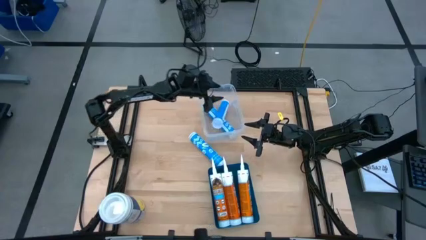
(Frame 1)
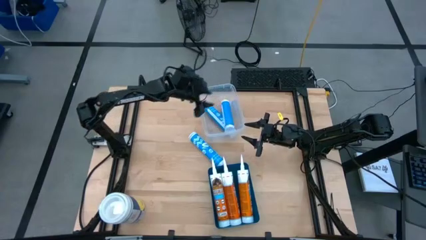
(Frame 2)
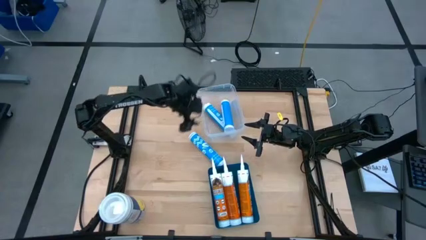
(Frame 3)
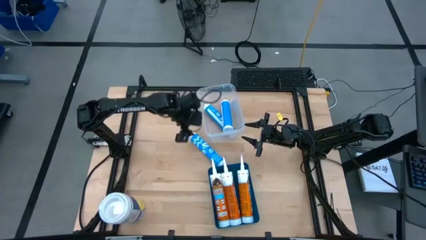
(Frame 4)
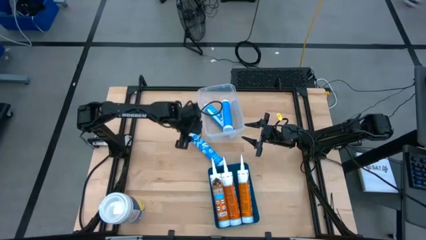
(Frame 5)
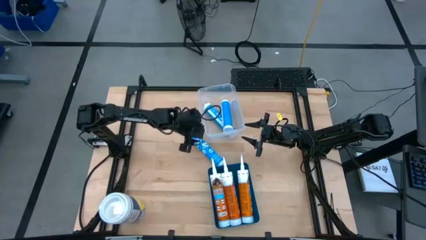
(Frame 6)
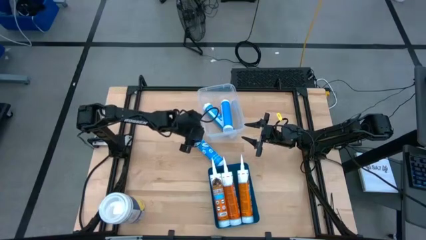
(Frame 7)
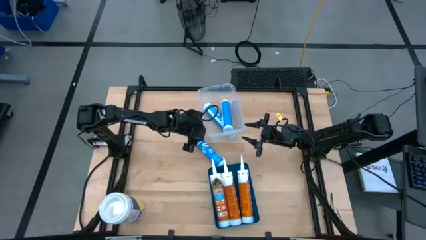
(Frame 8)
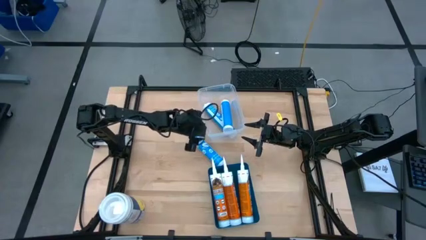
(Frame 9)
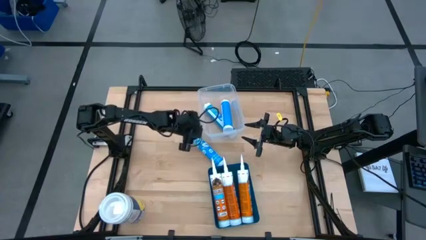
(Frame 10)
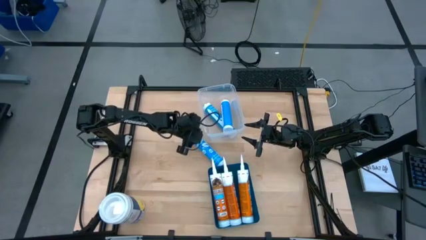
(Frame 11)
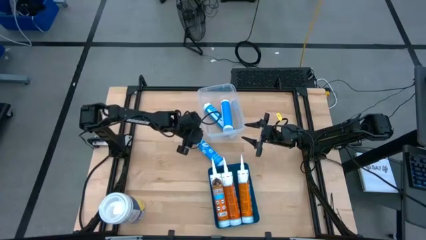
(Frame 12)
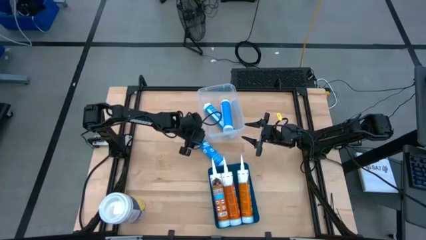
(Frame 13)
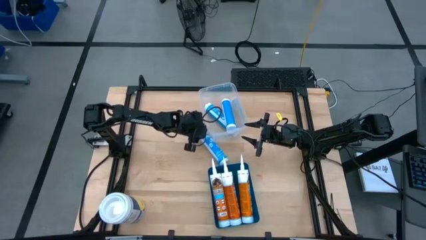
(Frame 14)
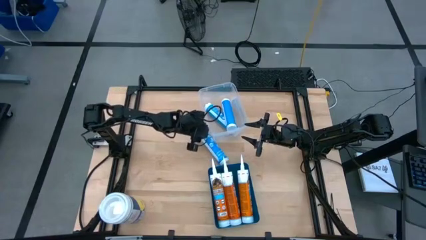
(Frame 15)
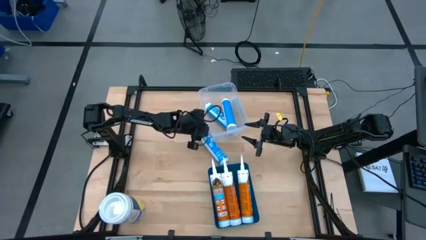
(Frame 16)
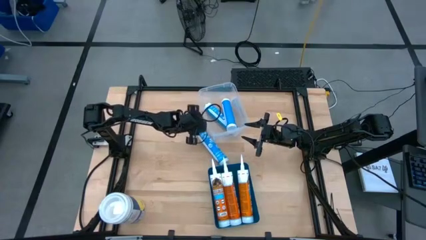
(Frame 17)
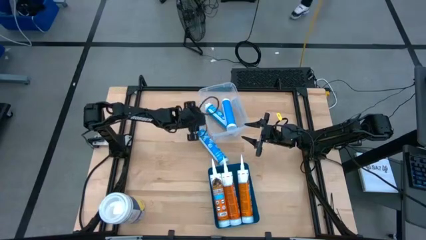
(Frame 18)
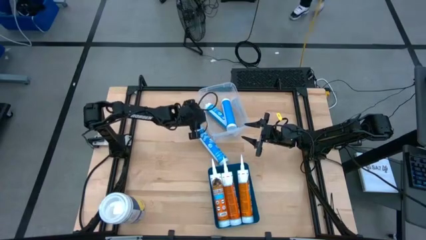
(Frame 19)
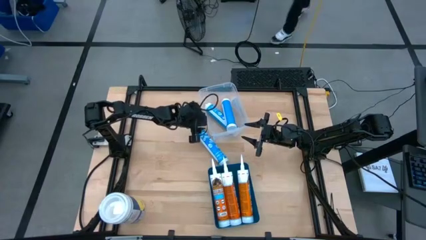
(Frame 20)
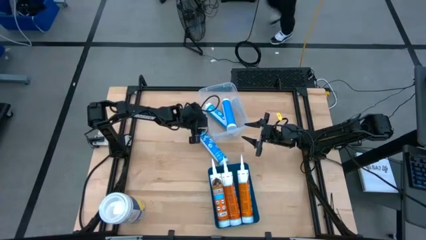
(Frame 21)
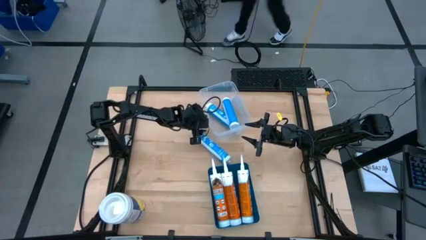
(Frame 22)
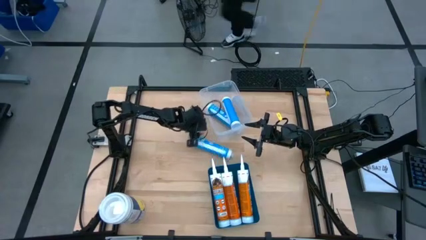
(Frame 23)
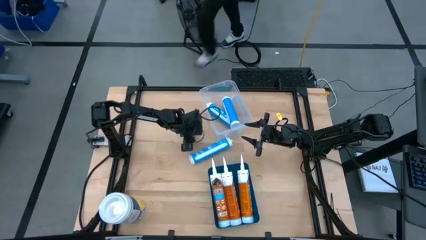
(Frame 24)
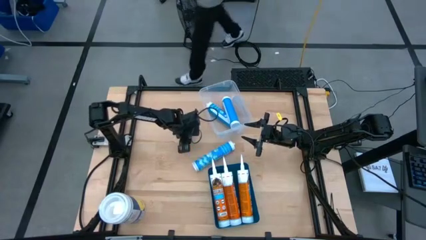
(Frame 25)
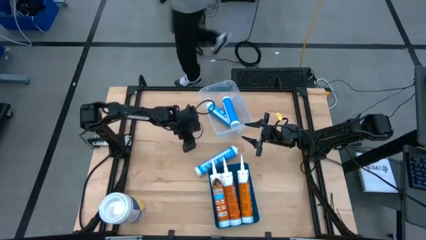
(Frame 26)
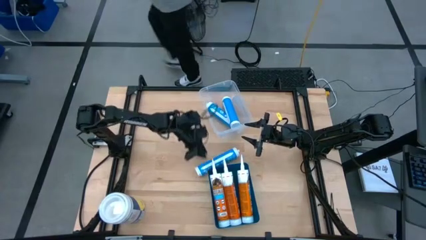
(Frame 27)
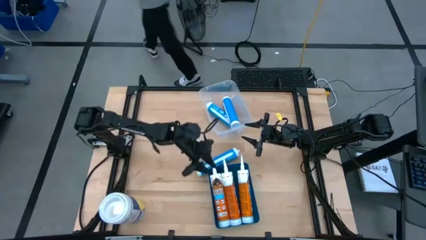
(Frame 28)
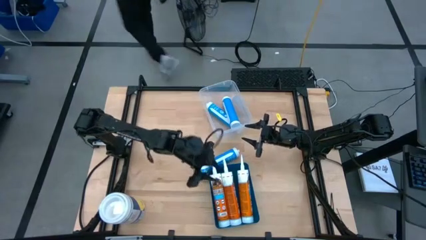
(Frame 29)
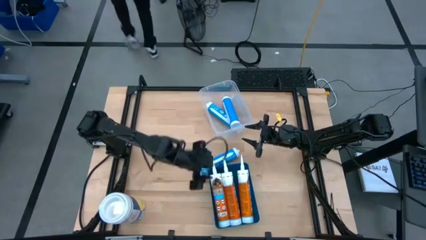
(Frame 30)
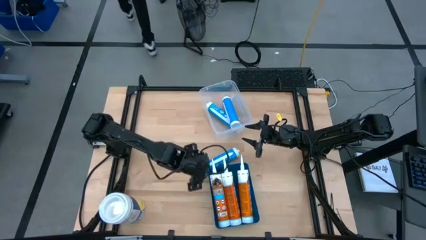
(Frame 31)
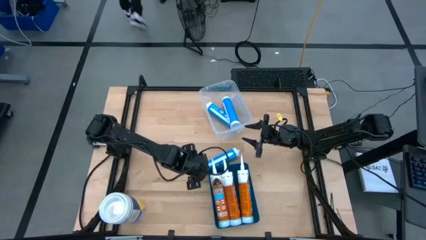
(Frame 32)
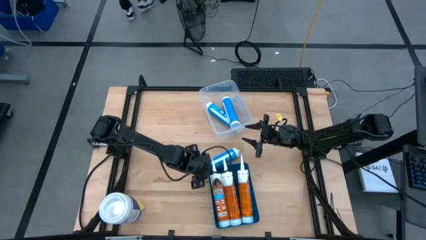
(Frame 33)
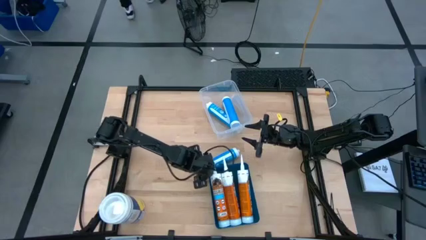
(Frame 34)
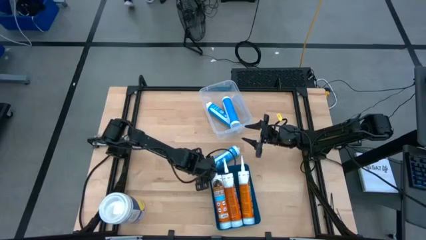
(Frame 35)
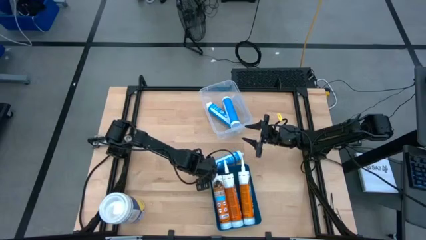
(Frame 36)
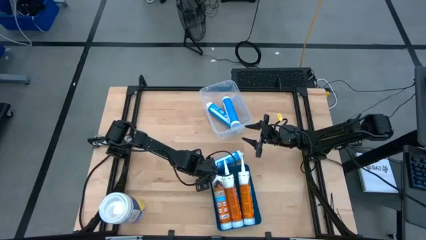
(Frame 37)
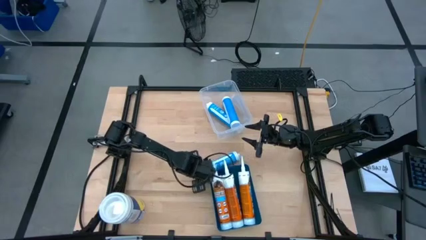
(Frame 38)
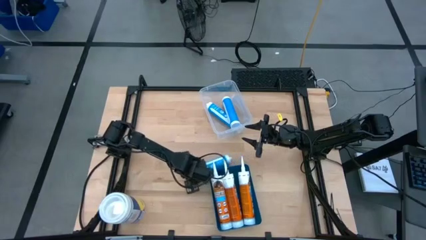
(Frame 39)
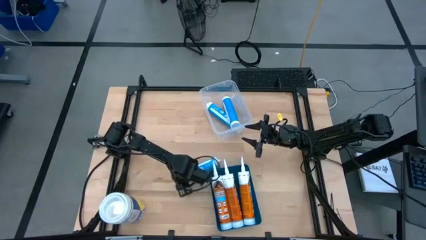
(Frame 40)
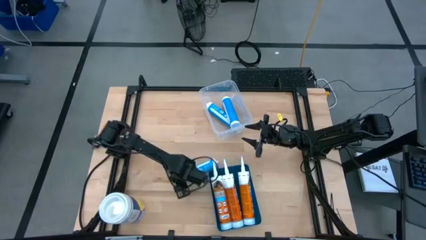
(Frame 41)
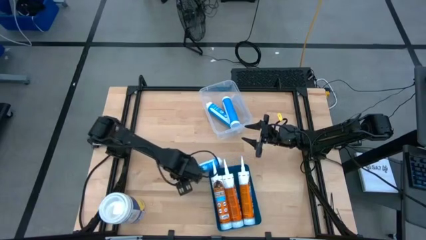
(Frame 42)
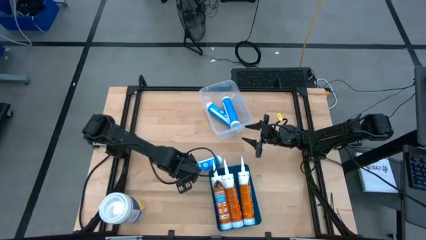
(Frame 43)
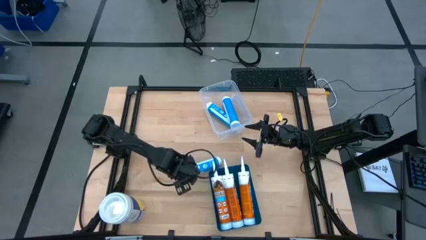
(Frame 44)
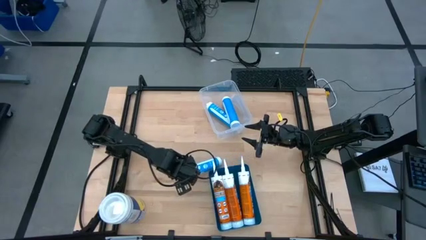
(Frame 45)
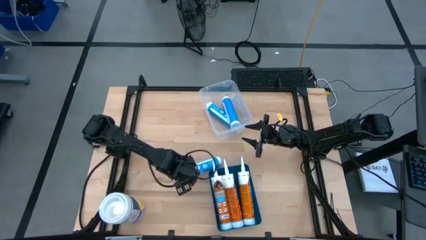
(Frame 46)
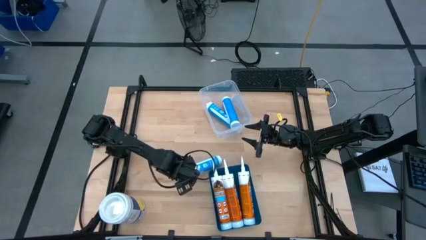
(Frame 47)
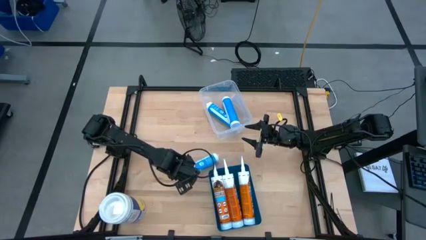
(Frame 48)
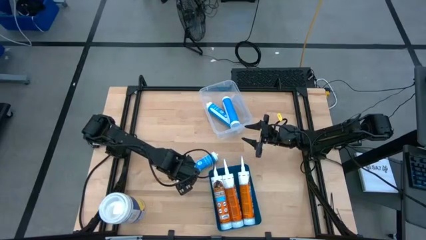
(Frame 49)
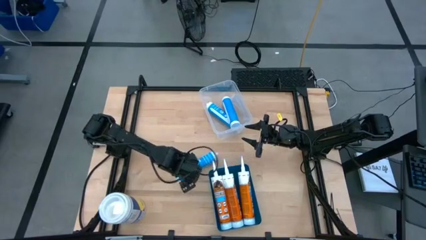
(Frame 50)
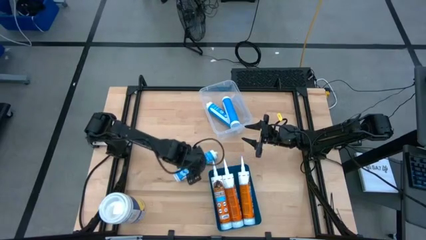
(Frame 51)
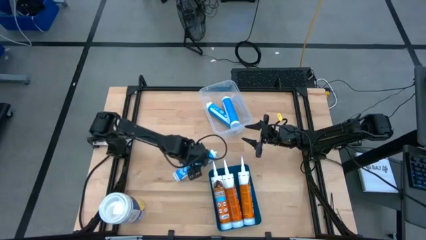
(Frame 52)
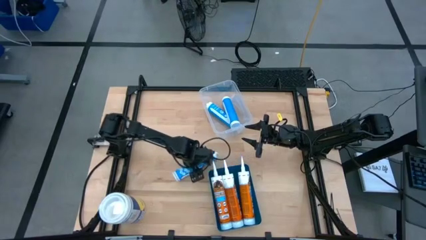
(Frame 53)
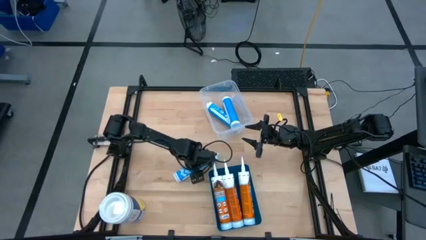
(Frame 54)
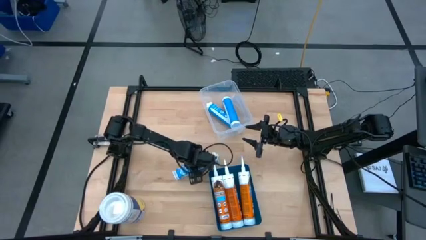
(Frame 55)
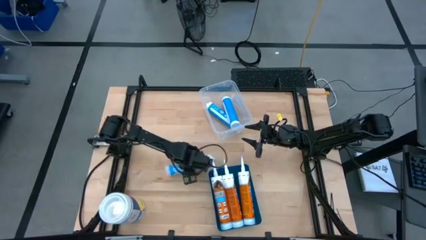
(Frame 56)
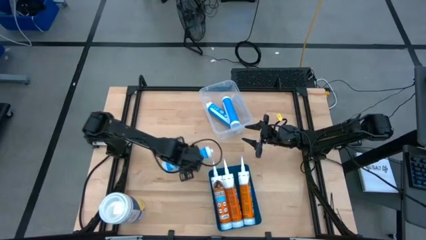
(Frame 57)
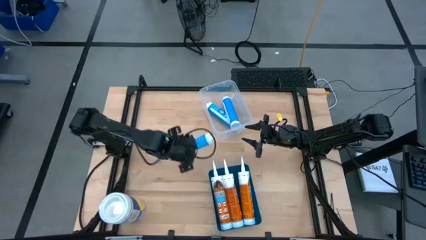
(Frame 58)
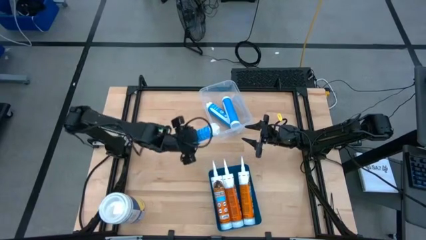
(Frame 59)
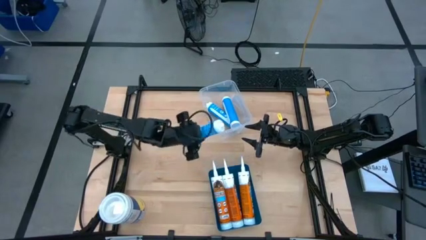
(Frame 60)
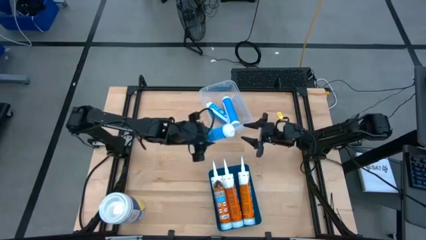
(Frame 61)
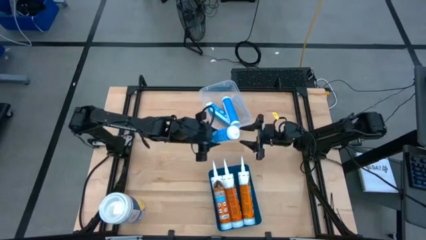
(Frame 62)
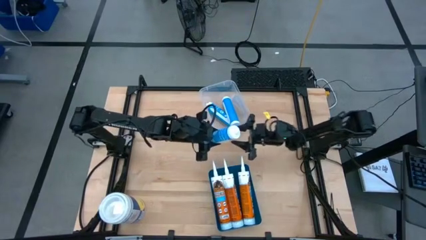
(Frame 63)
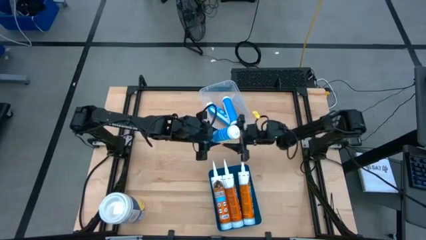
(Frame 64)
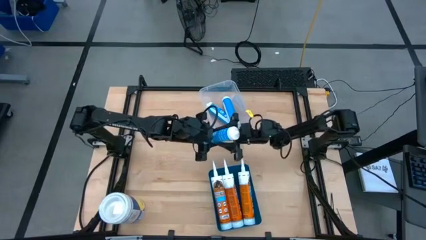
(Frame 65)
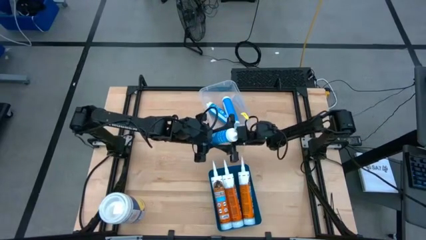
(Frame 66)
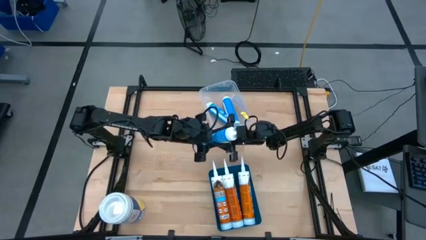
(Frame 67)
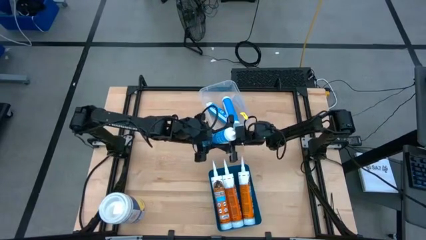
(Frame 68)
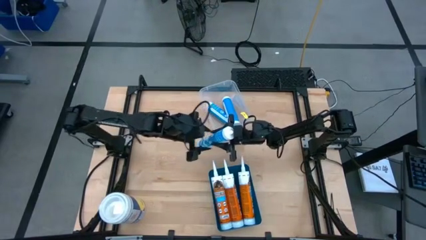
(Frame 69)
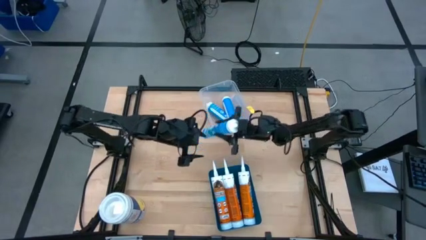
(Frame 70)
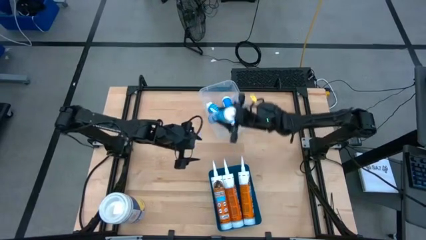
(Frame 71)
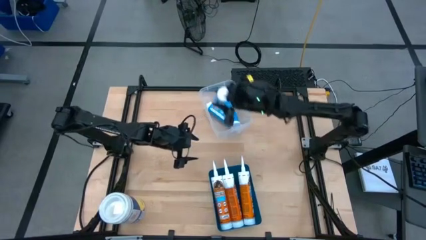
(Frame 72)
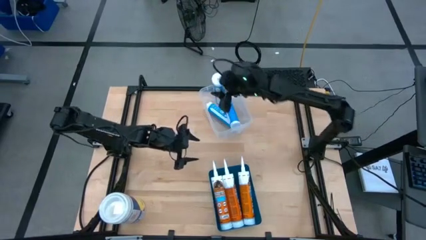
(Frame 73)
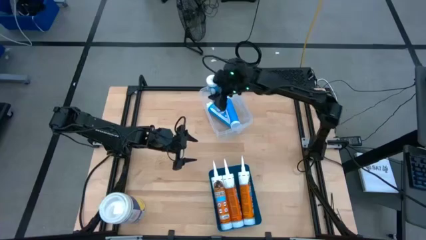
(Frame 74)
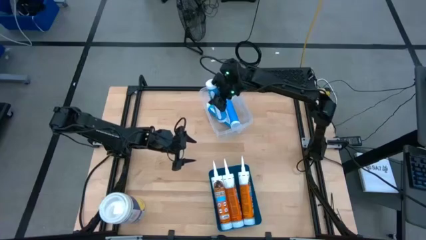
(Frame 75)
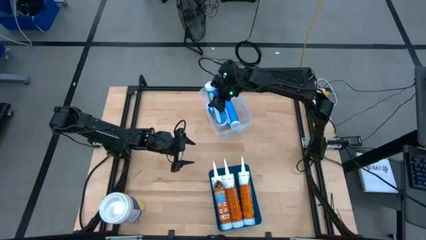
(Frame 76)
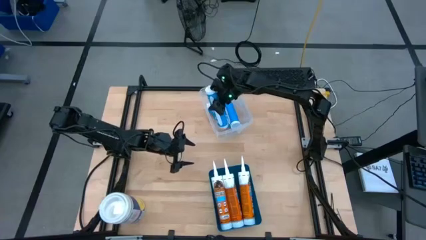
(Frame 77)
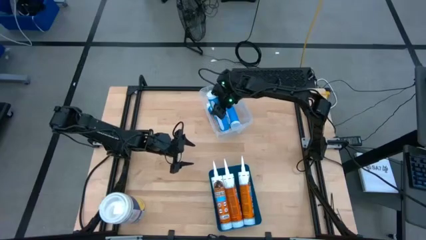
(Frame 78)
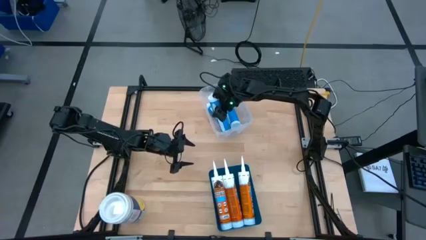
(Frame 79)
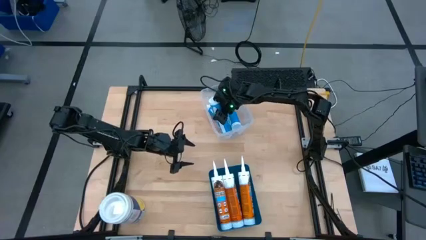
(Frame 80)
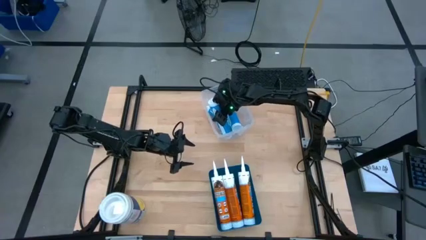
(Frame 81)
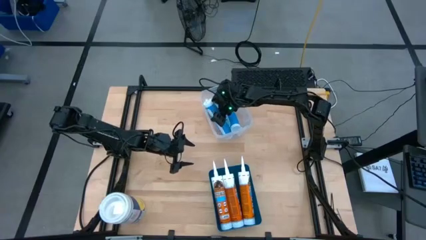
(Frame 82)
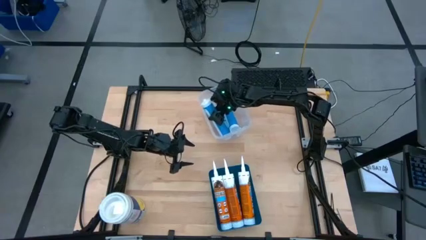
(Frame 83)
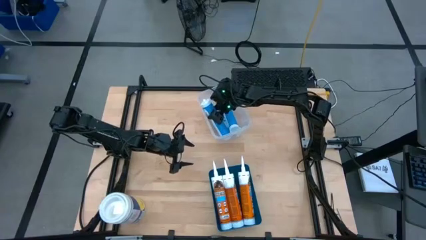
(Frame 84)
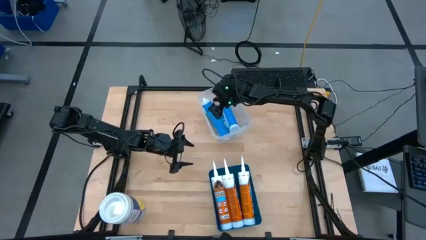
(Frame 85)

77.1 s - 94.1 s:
Task: Sort silicone sealant tubes
Put the blue sealant into the transparent container
